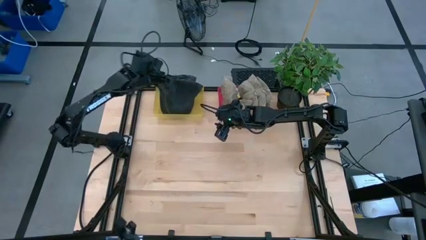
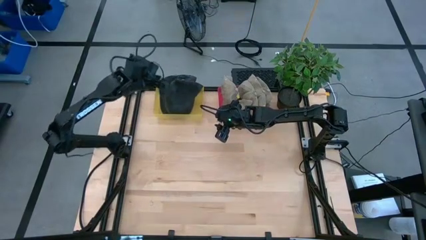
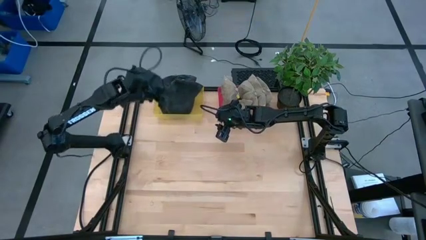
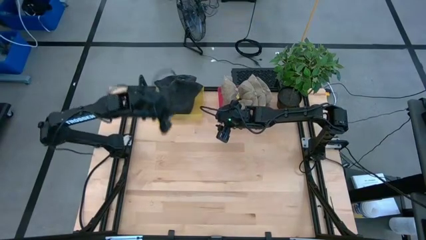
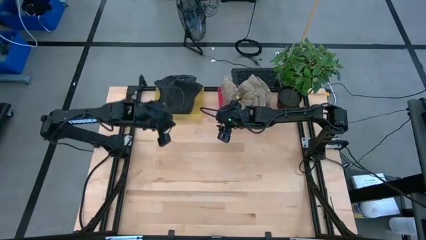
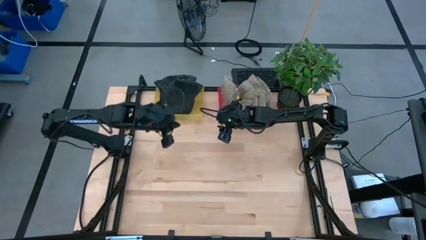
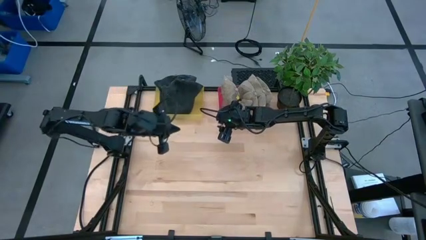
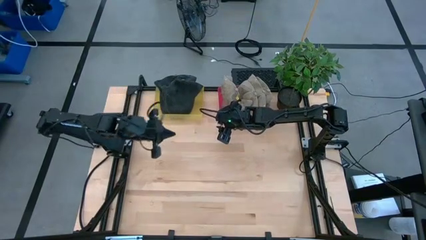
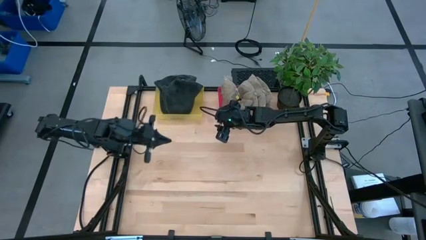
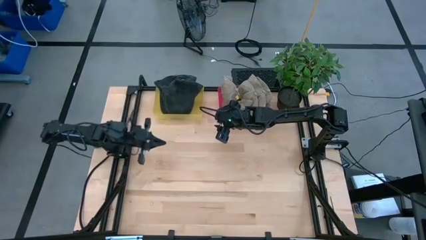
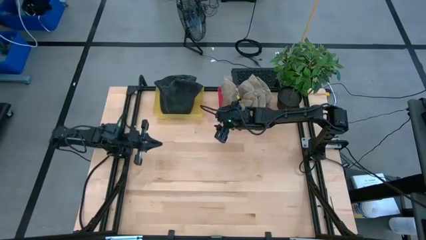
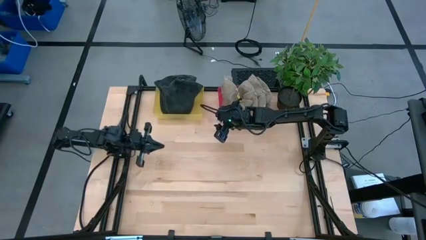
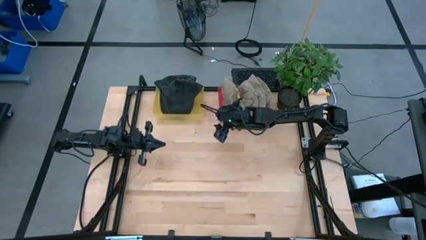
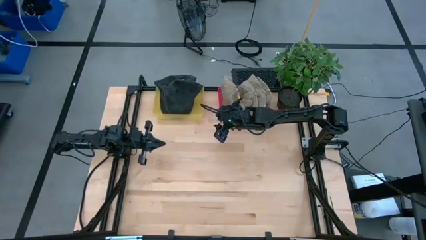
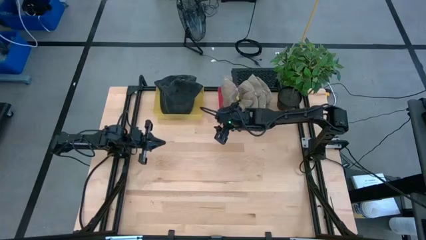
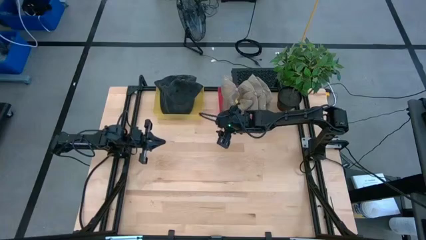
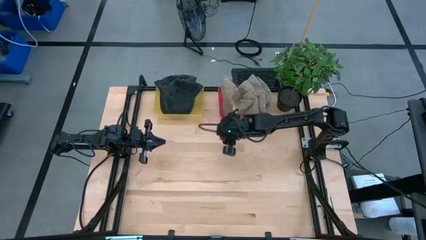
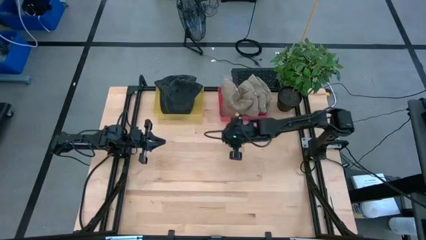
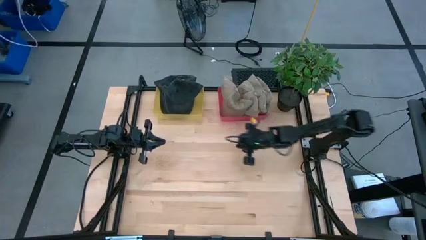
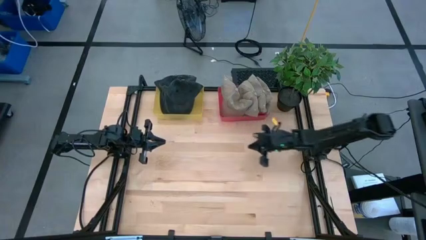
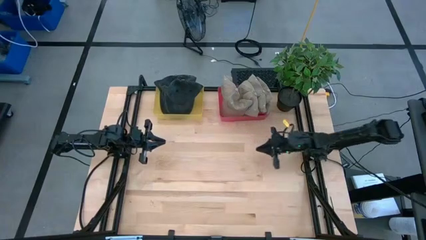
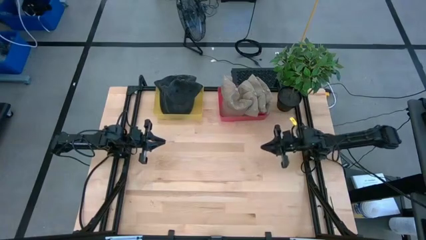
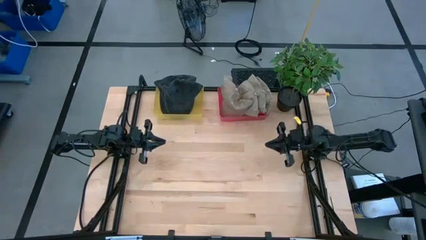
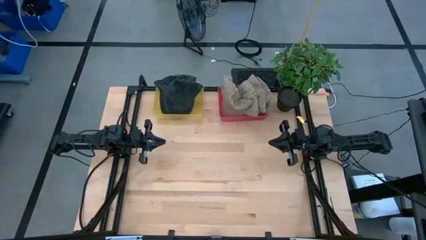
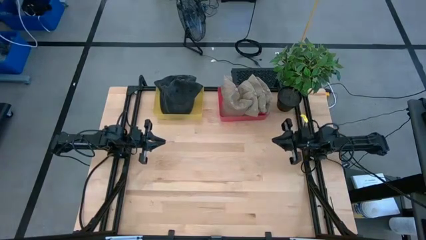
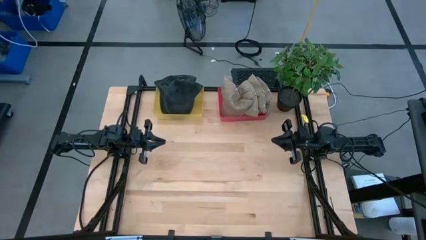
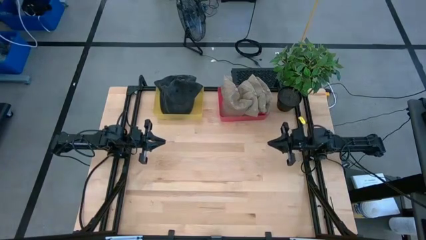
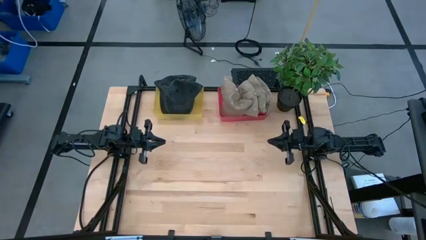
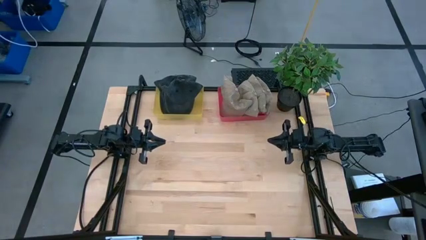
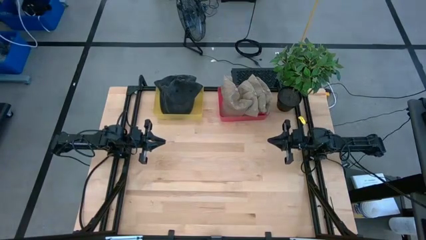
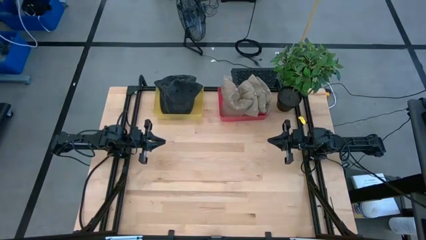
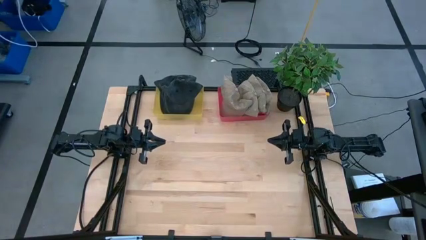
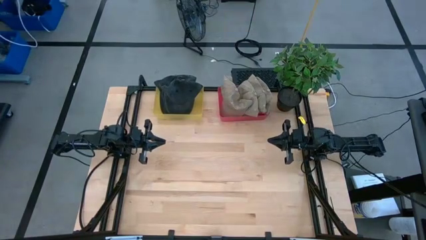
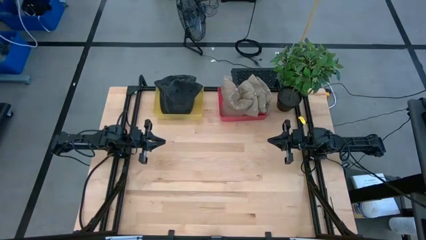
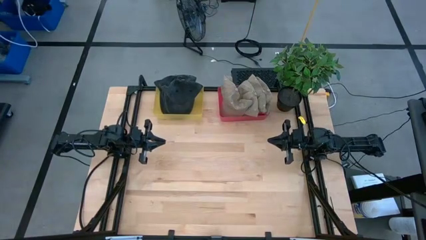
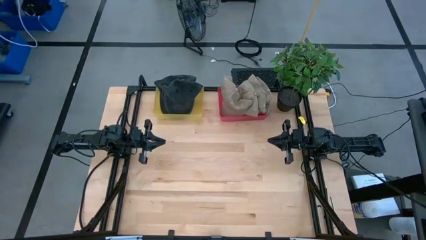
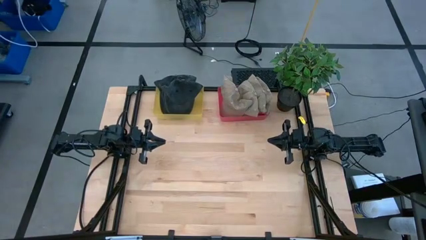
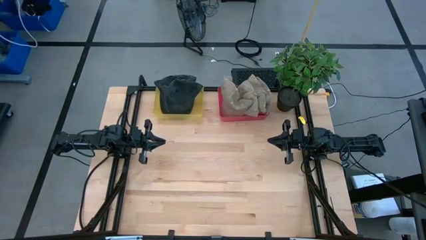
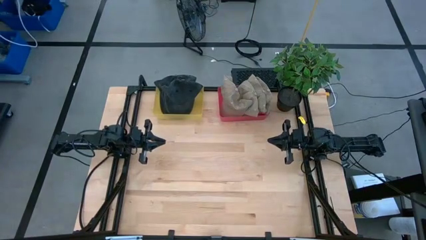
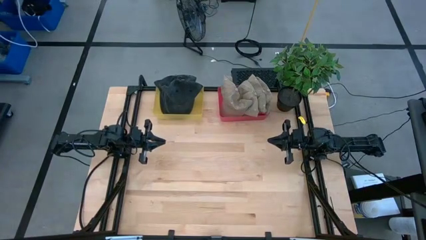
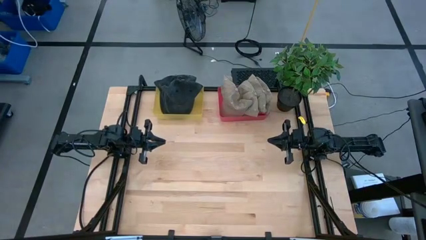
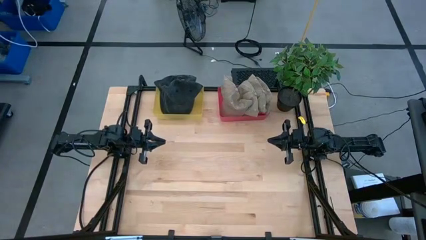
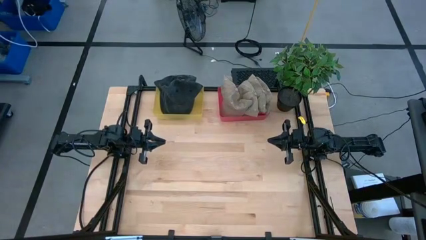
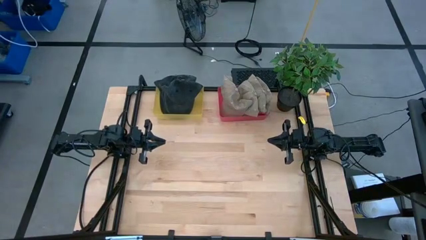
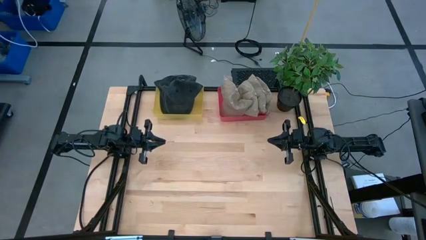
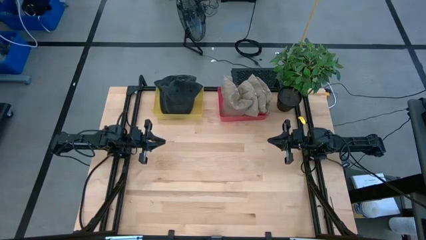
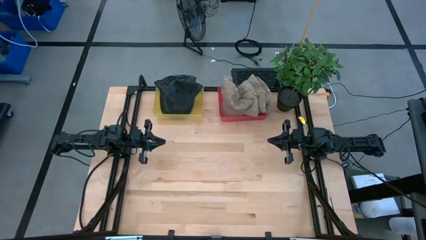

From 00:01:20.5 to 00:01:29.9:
Task: Pick & Place hat
Return to Home Position

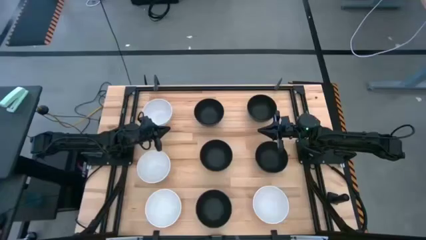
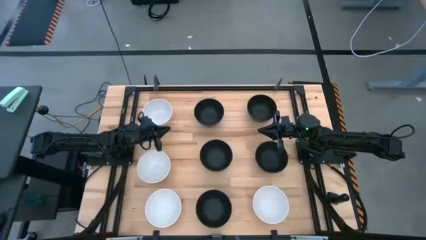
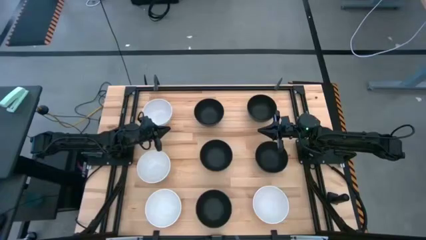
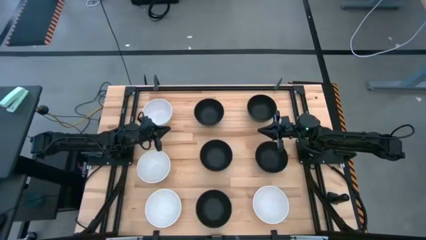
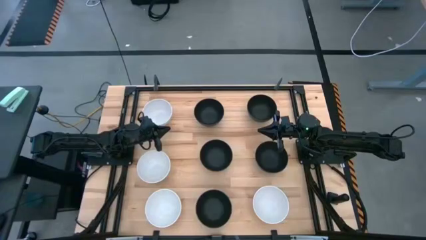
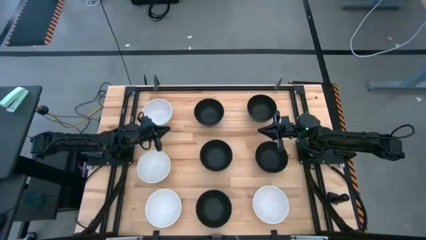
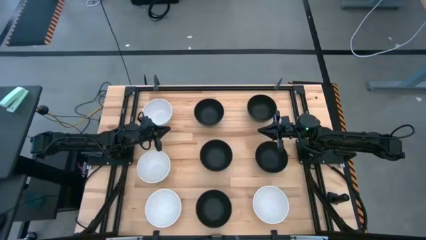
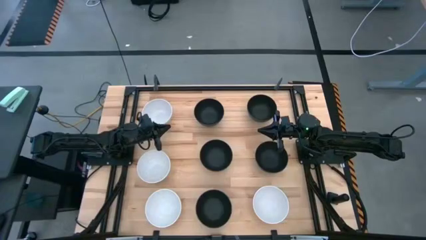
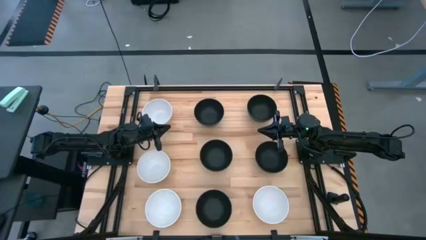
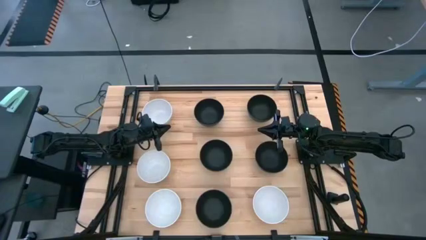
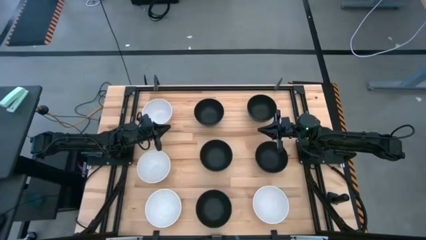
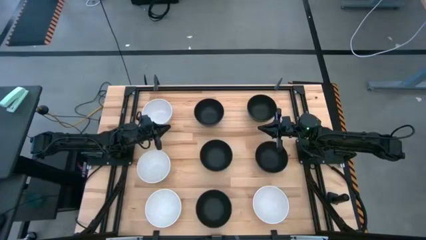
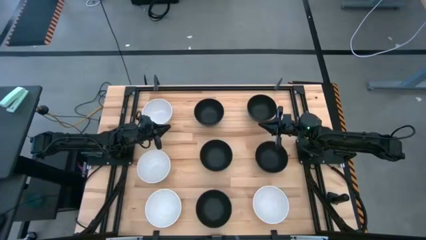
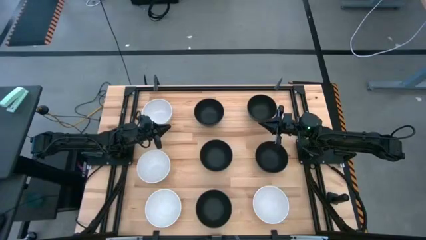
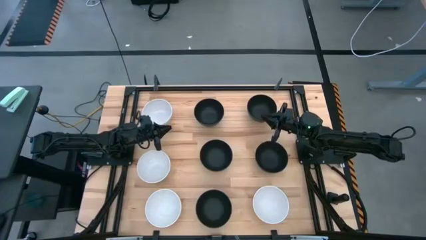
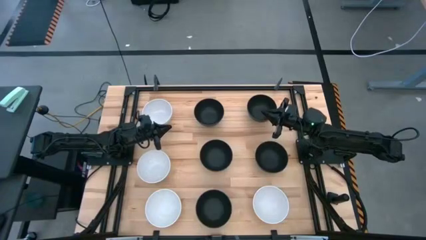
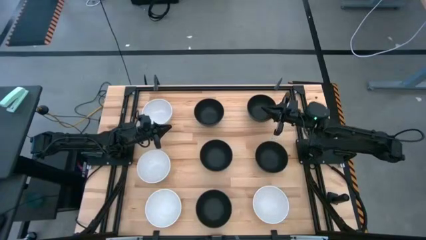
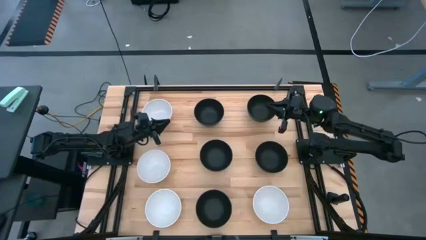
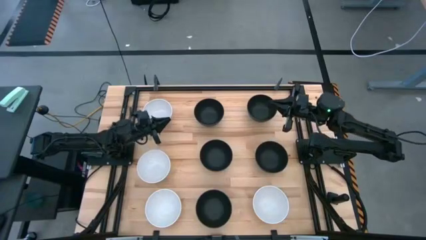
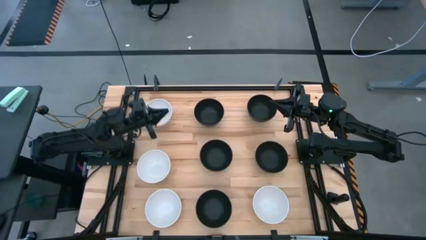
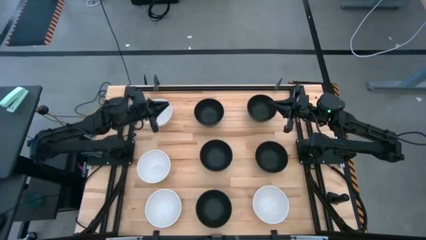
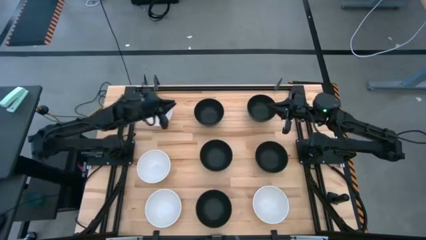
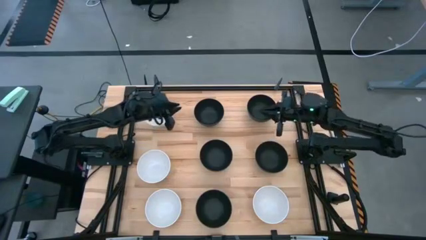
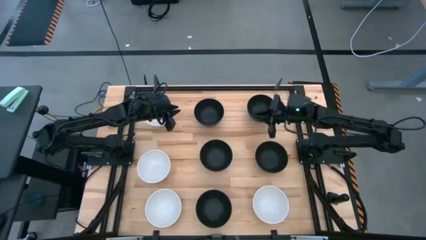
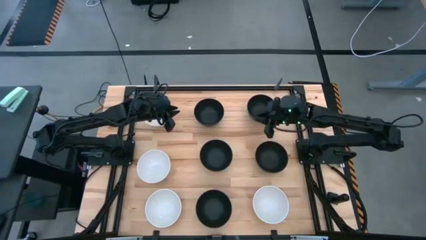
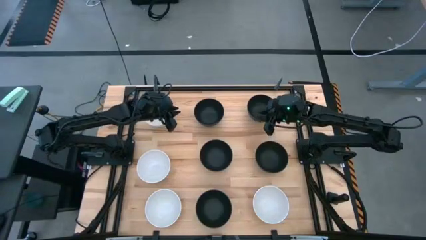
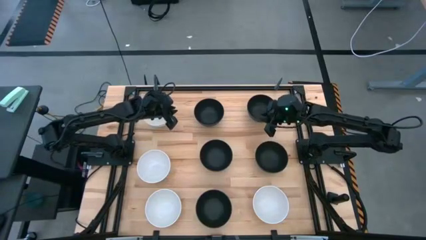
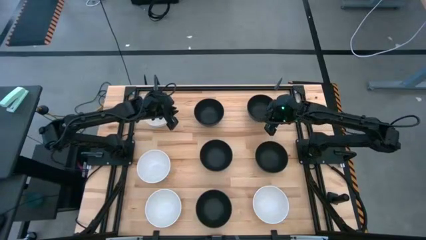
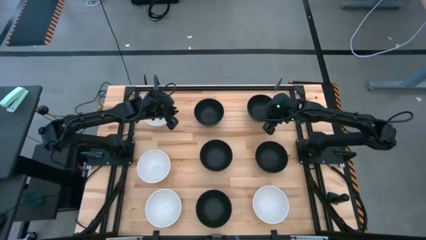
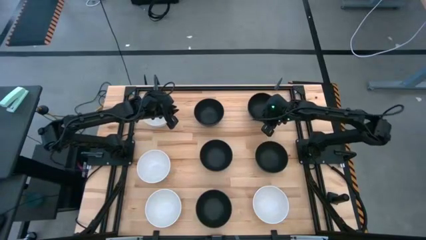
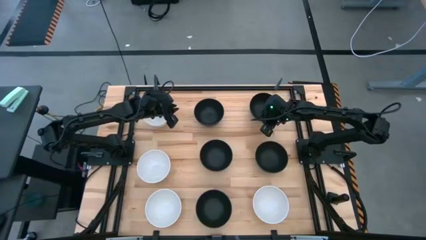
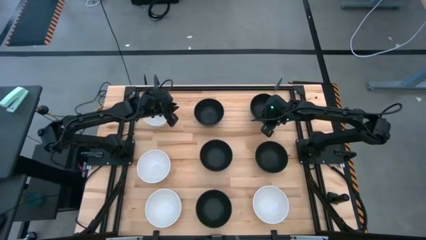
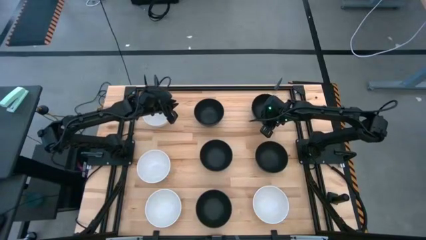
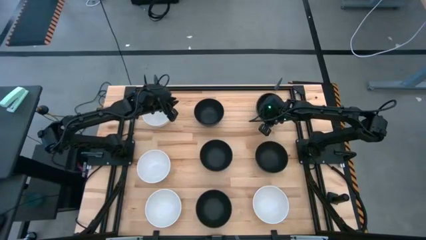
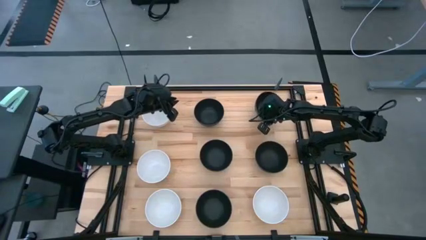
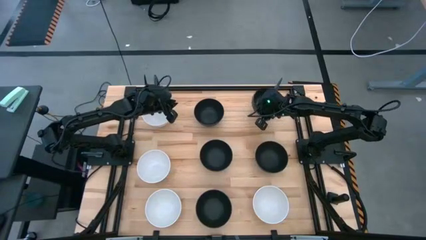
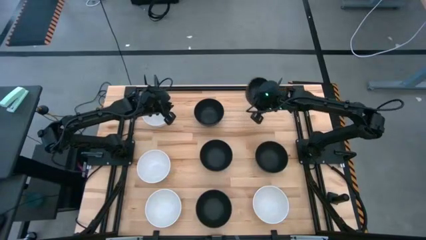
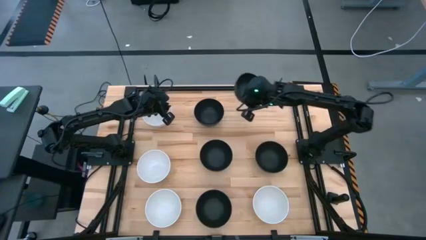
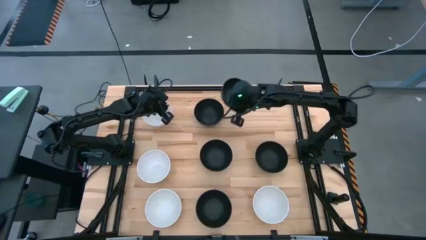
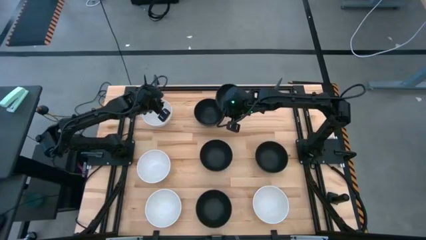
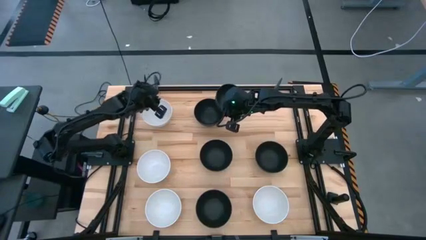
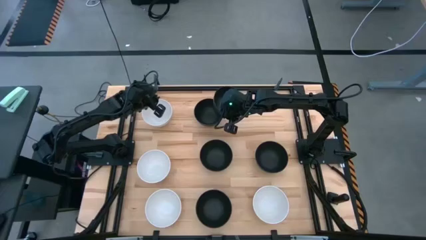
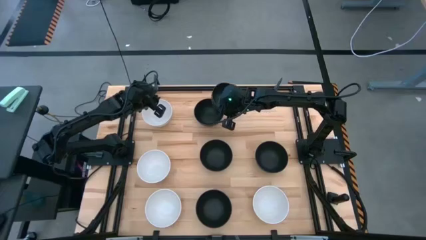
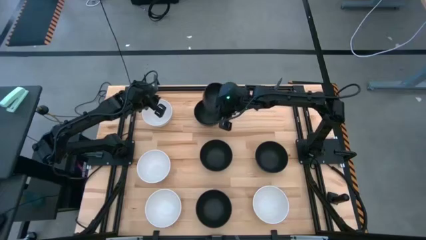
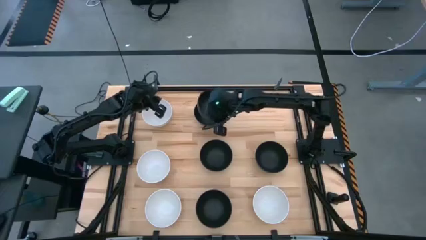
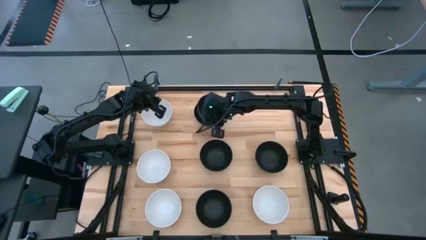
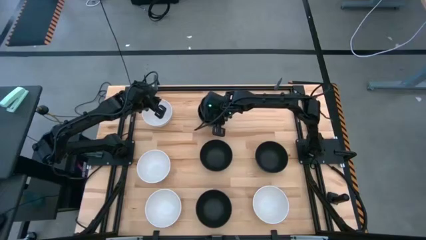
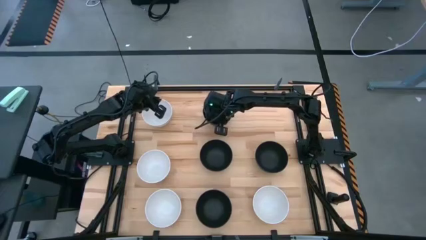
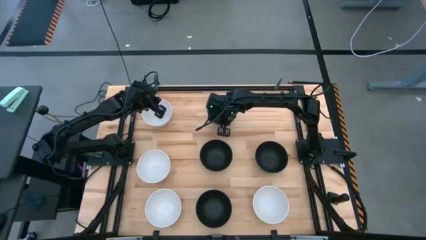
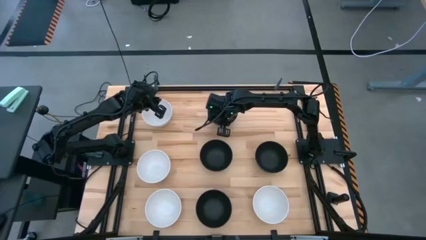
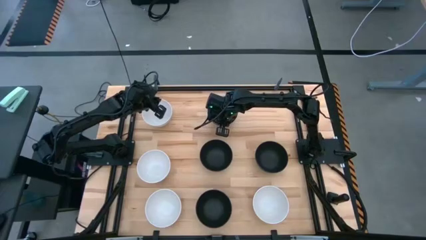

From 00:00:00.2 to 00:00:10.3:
Task: Nest bowls inside each other
Stack the black bowl on top of the black bowl
